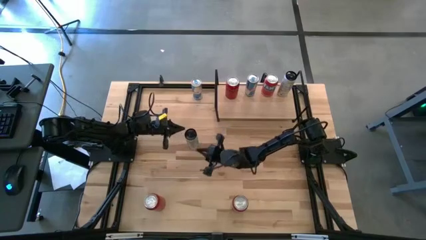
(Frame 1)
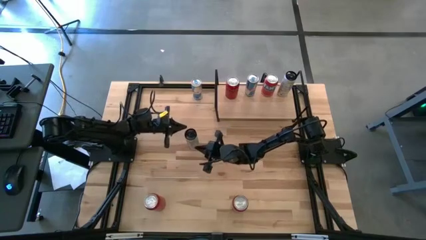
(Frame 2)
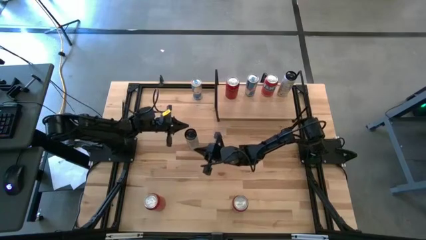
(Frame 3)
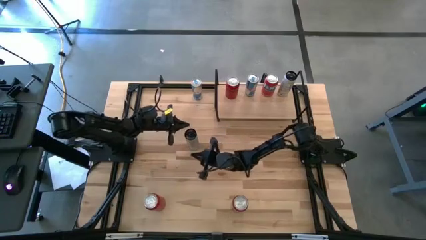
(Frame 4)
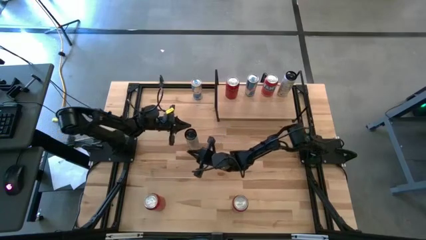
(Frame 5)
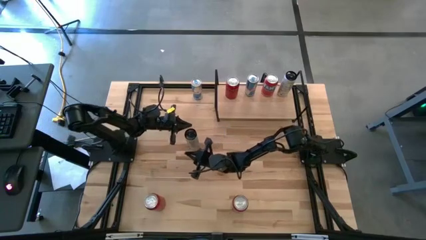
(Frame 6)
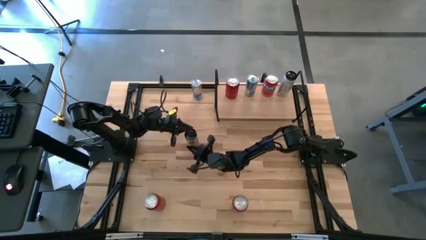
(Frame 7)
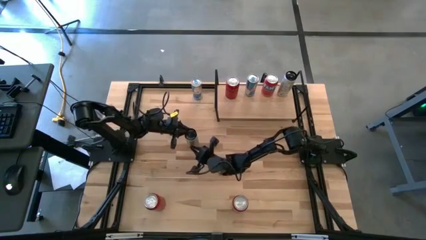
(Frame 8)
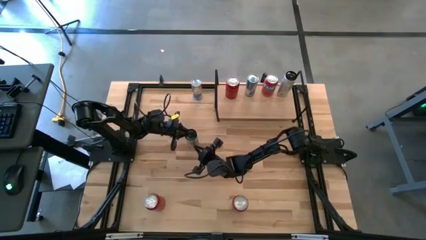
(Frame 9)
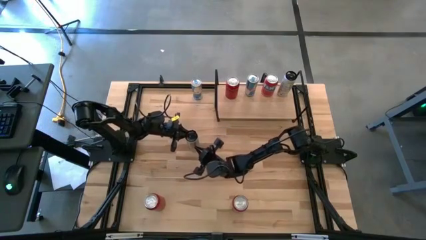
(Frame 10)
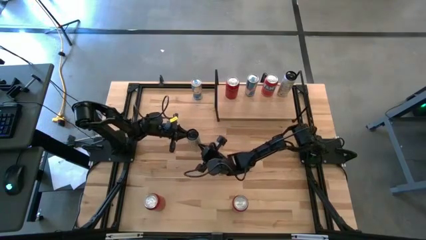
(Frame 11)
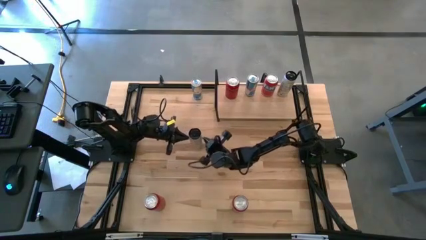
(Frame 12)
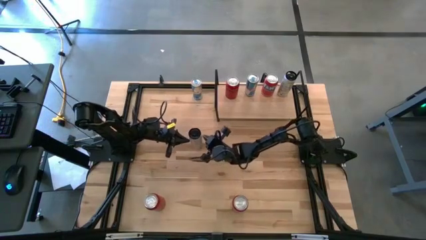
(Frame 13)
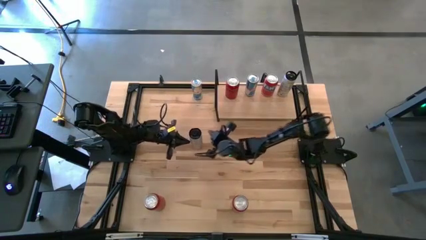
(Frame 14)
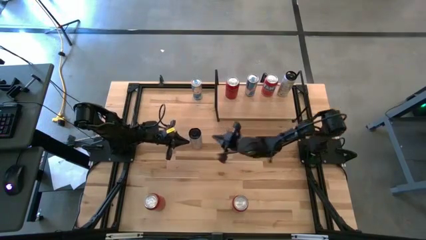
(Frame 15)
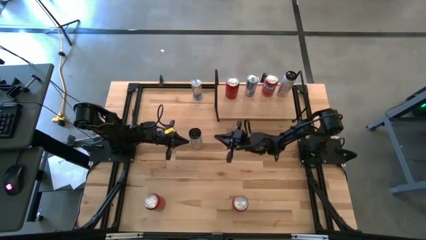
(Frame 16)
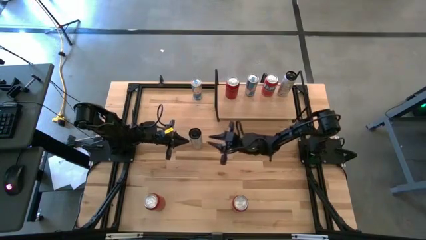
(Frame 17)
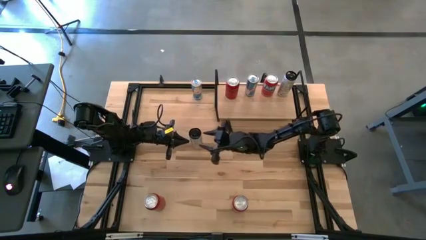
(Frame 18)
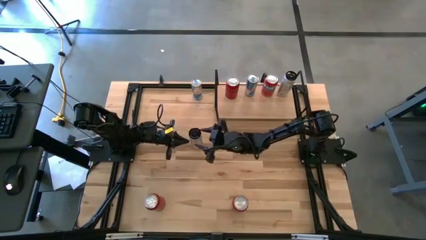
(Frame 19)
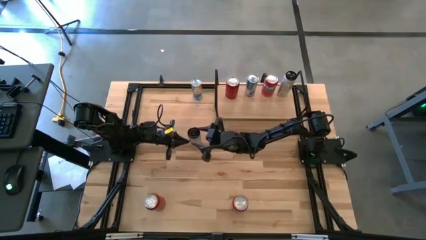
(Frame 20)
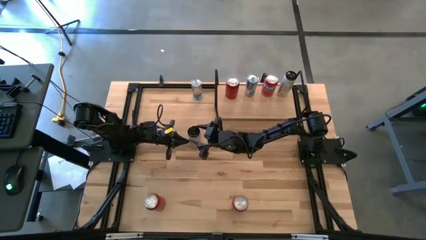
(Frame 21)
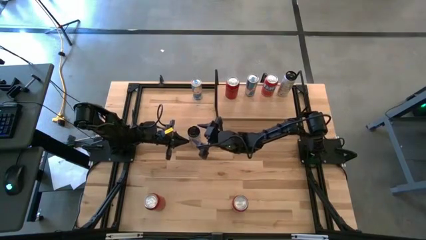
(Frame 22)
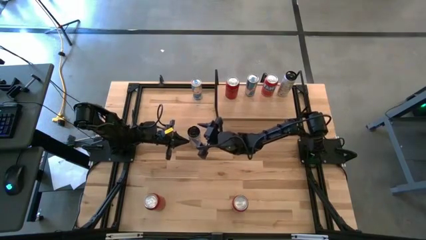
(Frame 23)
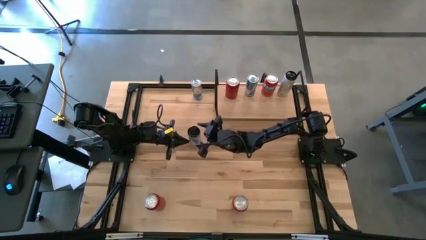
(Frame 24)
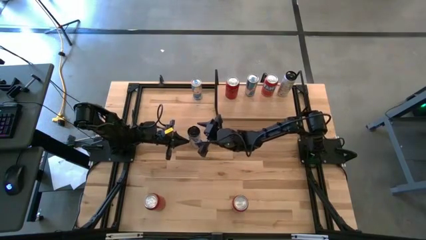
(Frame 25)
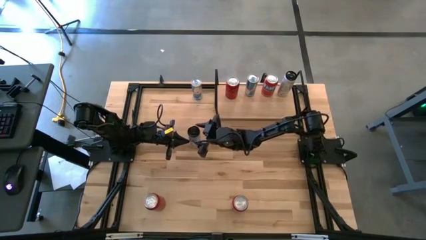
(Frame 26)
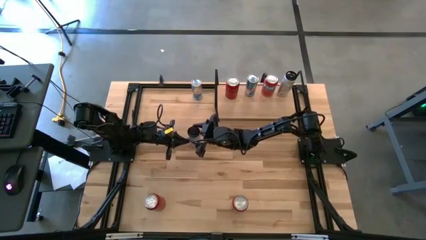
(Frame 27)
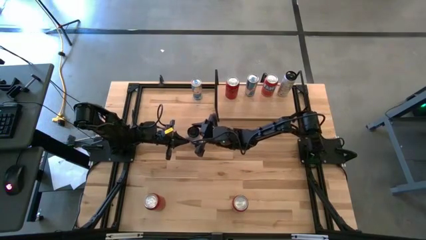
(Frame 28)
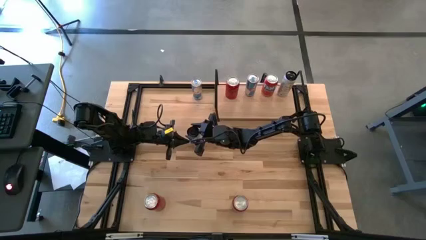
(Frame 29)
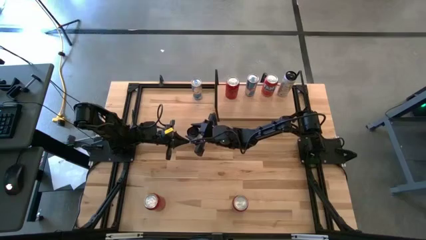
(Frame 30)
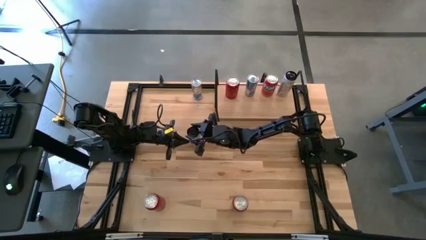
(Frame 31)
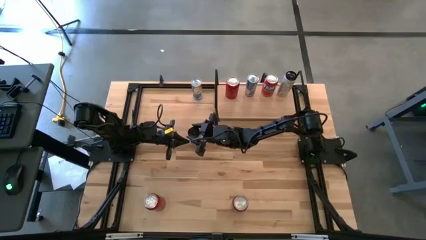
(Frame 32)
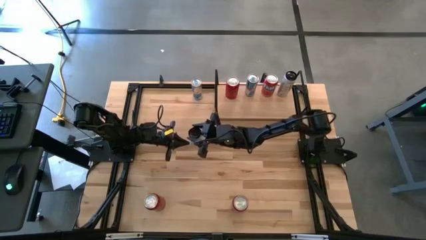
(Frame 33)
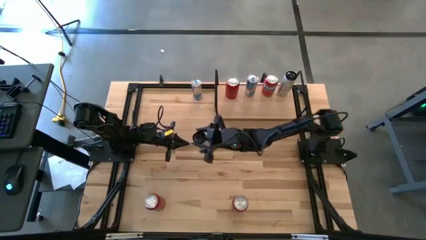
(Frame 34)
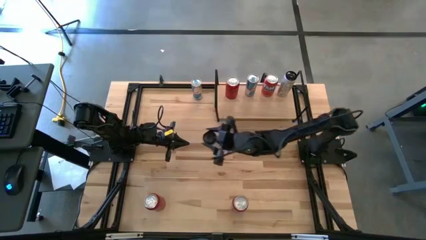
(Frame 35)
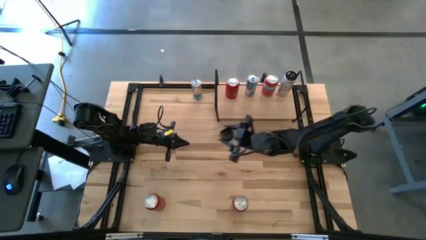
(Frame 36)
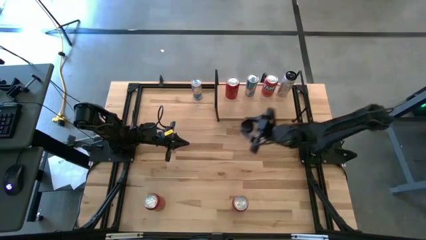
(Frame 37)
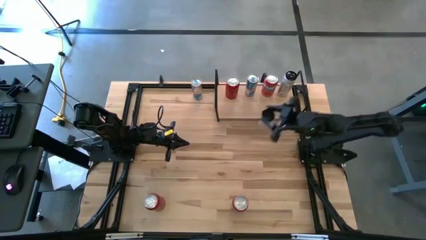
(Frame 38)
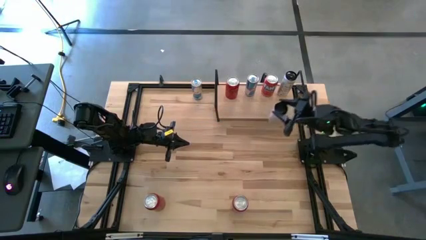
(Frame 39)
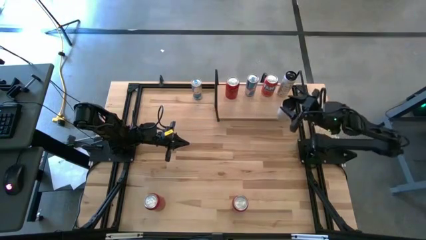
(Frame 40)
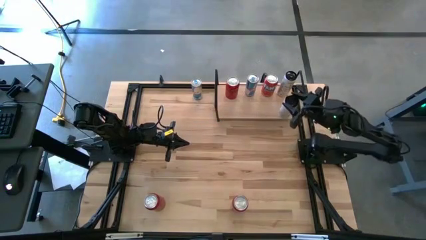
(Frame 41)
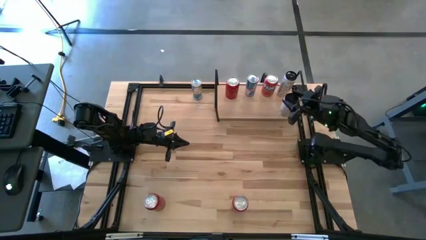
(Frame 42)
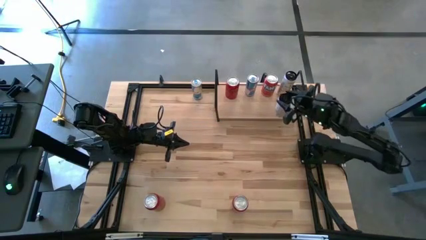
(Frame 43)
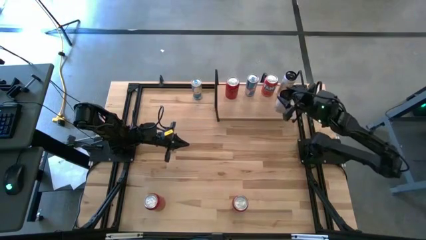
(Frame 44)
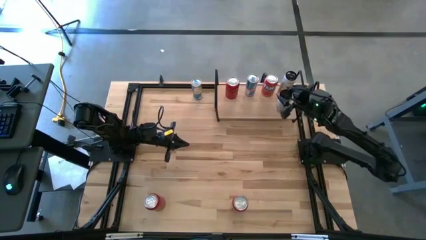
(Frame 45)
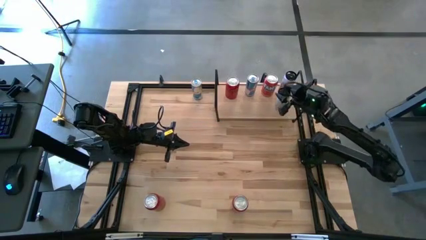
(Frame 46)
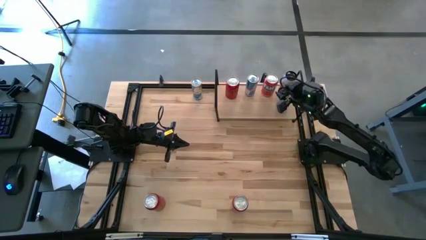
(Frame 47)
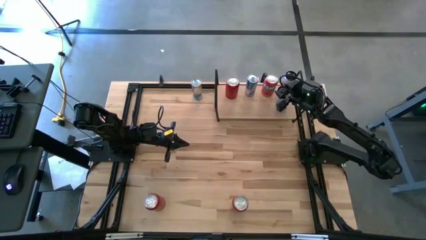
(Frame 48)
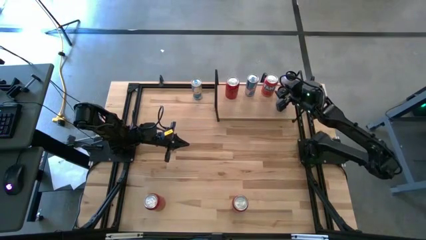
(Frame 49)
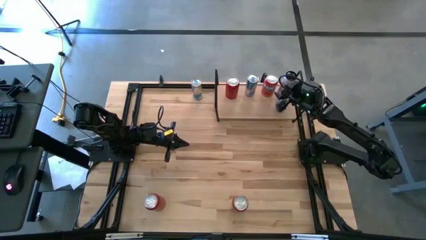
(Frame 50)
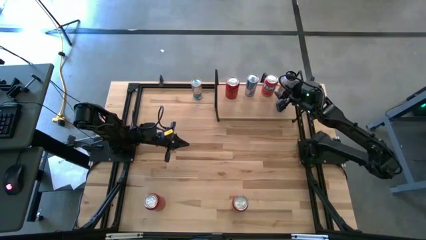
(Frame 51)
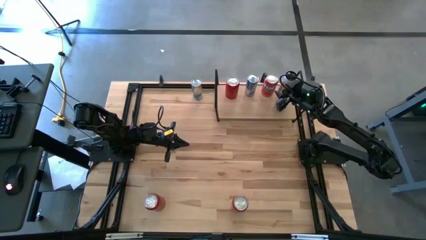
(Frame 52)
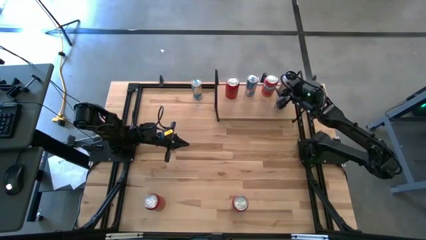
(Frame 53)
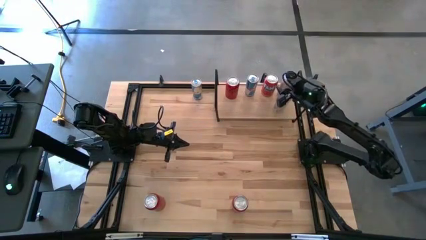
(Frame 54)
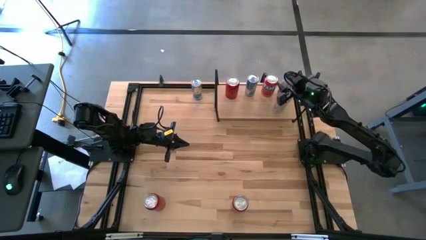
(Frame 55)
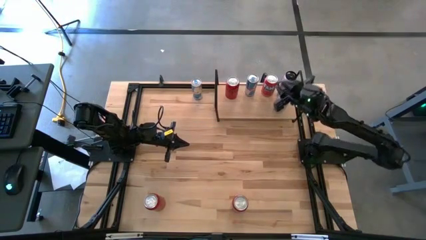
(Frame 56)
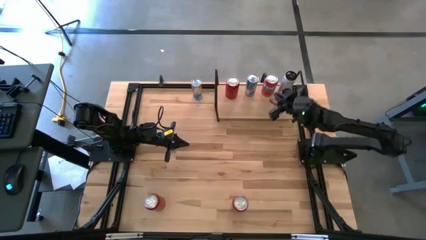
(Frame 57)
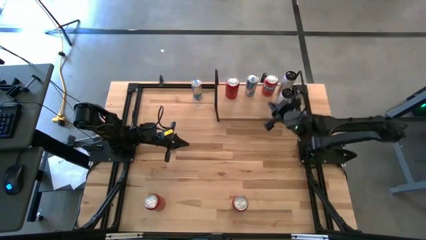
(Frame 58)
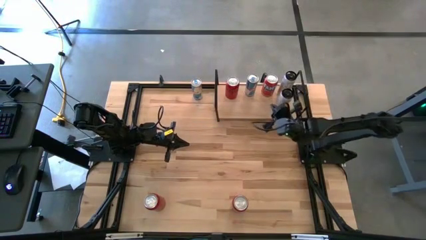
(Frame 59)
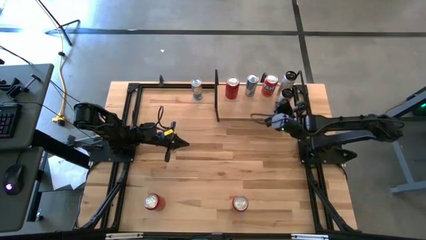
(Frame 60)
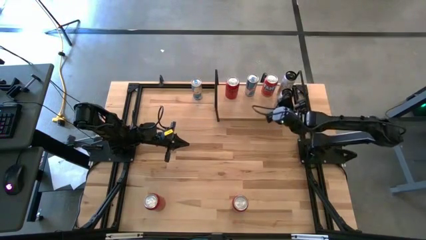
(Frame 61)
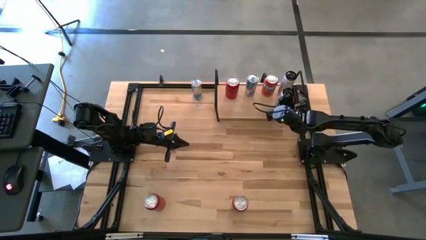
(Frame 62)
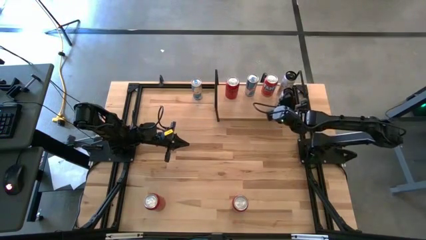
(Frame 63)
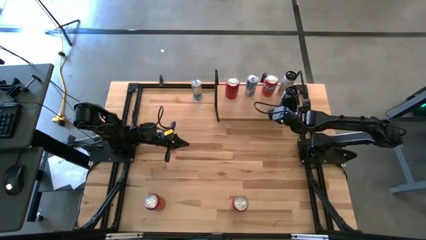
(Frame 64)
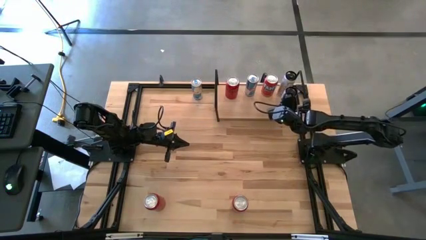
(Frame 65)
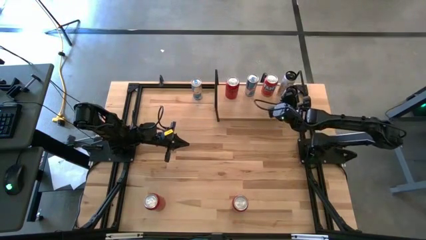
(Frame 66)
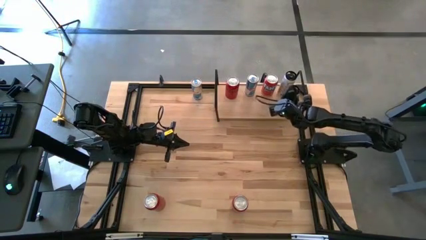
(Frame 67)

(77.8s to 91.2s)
Task: Place canned beverage on shelf
Put the white-yellow soda can on the shelf aligned with the other white-yellow soda can
